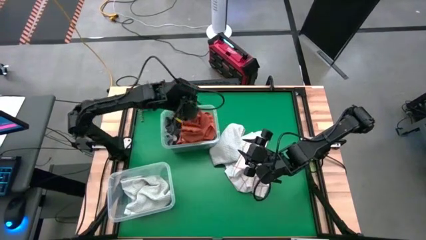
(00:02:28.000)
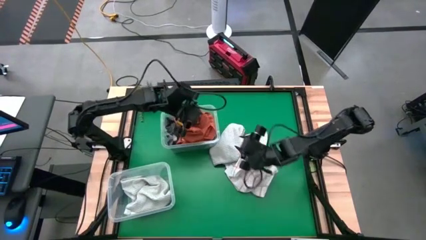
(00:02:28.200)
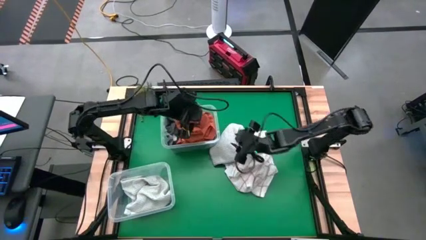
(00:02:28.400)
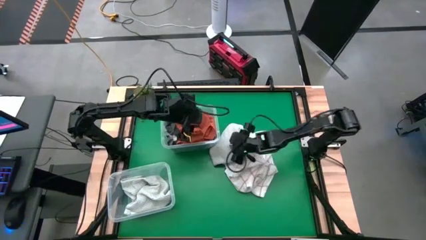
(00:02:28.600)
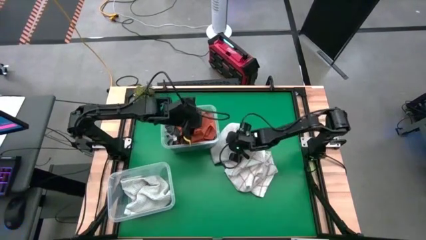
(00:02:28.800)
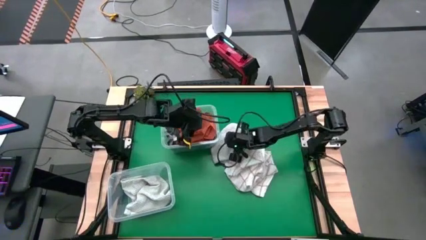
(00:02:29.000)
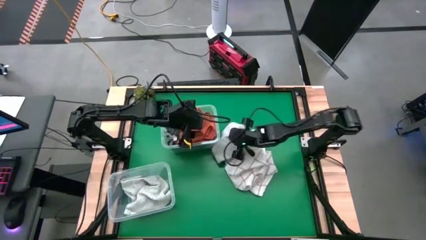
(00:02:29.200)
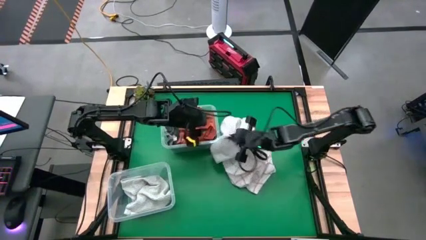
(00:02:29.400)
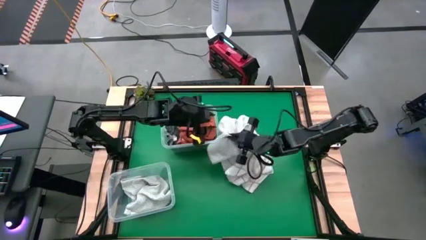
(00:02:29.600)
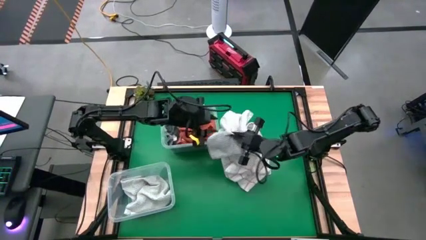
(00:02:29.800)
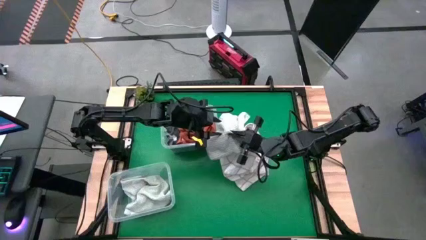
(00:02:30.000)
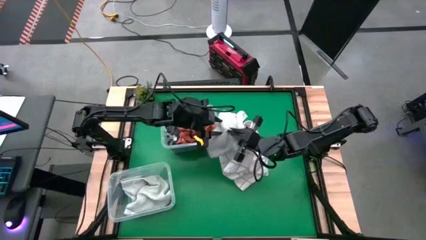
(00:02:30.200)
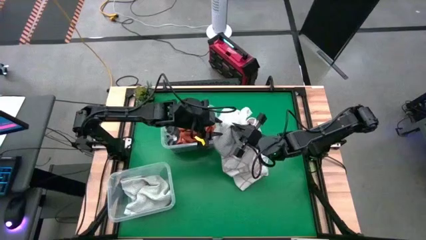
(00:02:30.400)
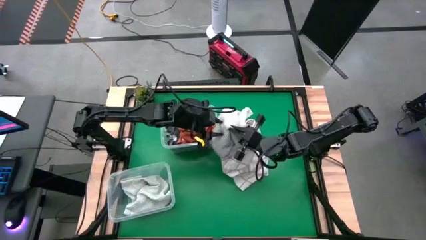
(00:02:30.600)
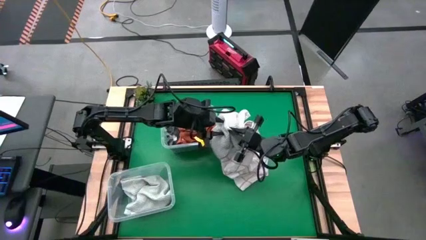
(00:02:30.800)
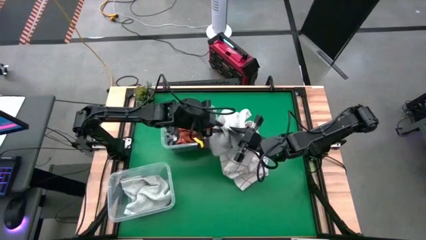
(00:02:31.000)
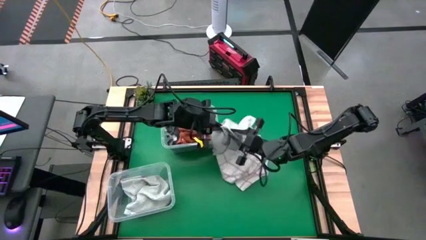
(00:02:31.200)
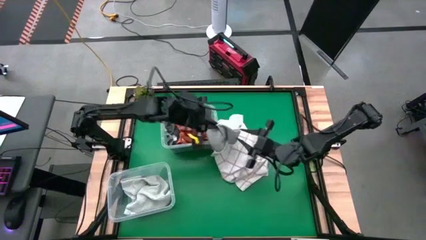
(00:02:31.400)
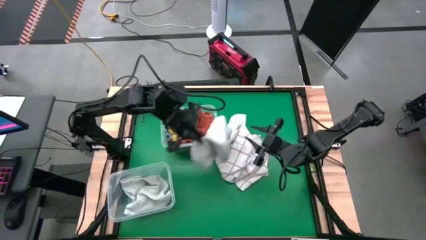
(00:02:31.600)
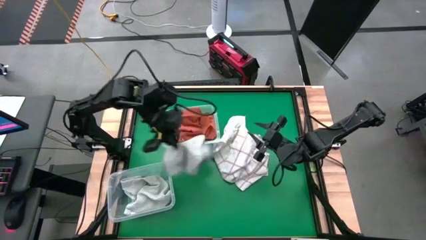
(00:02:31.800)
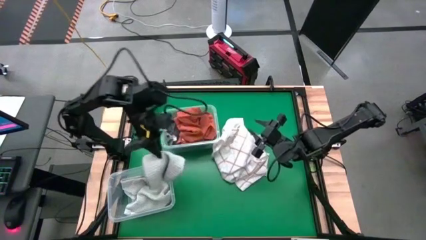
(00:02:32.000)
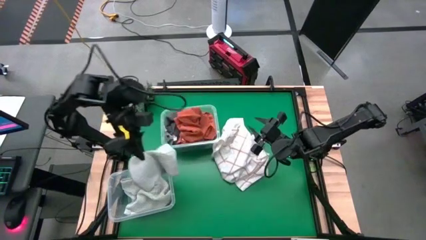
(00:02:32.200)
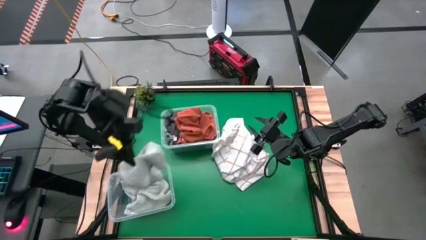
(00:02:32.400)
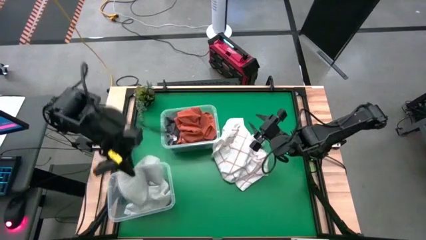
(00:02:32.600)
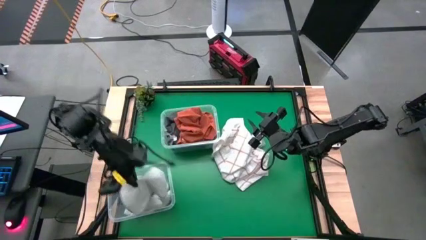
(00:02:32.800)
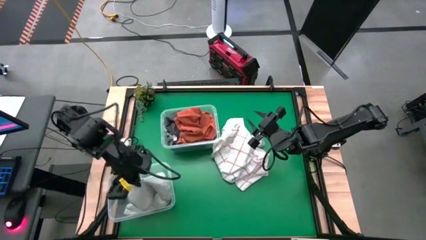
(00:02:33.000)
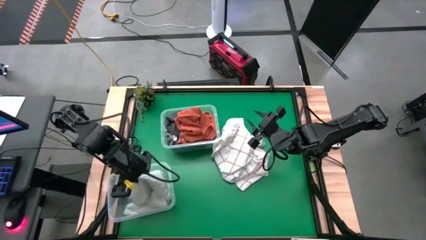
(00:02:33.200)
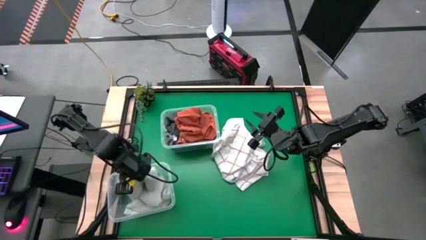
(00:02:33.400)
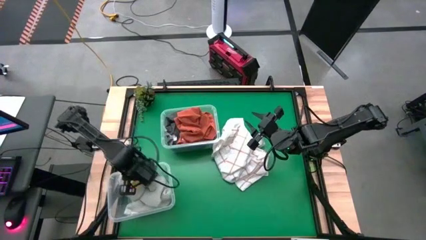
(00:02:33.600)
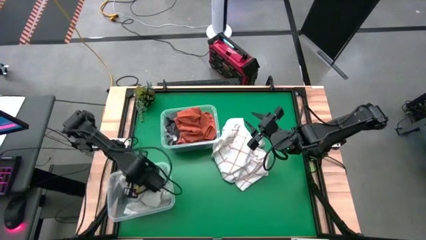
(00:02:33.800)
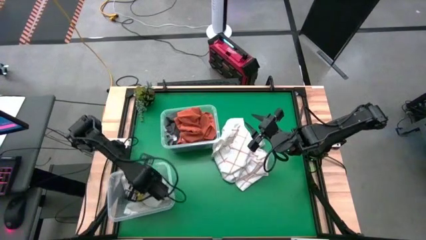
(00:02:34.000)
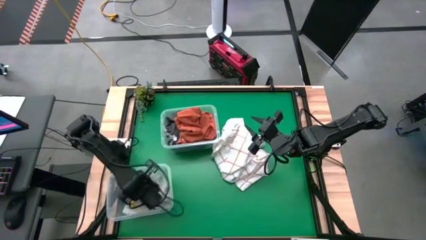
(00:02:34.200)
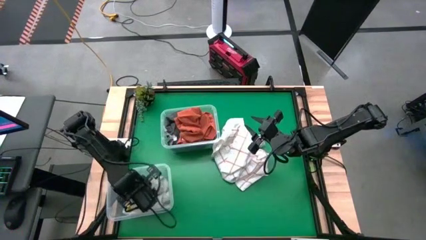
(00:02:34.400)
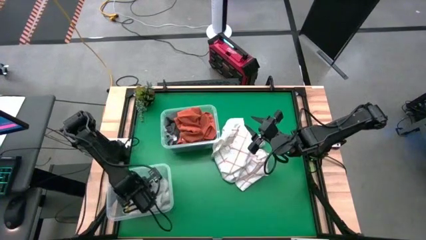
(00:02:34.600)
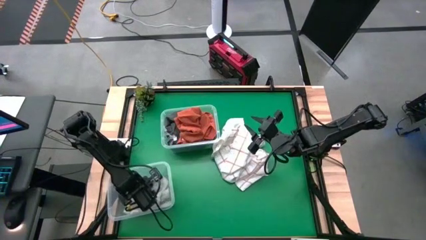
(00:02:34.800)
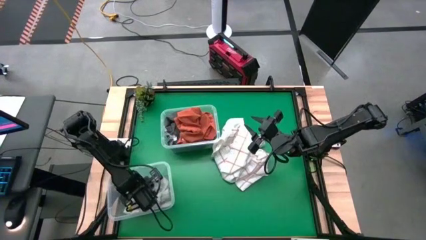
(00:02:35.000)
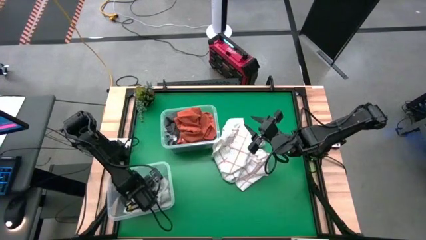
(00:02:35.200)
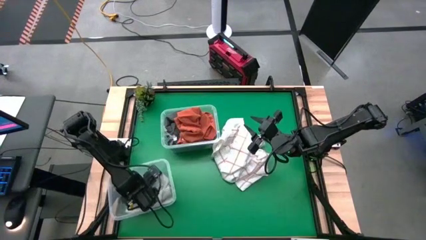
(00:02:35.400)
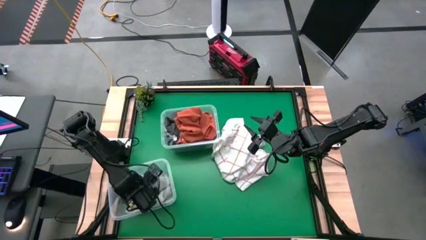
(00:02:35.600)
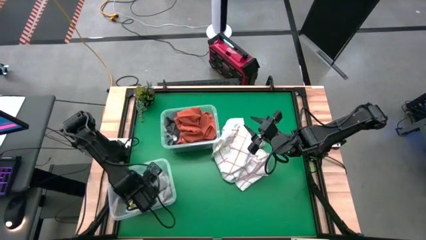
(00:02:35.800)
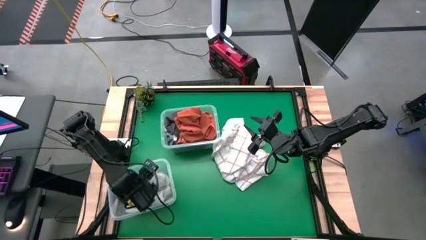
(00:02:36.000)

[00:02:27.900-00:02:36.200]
Task: Sort towels by color in basket
Put the light gray towel into the bottom transparent bin

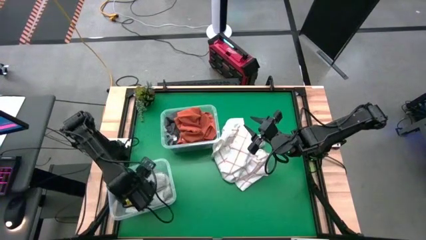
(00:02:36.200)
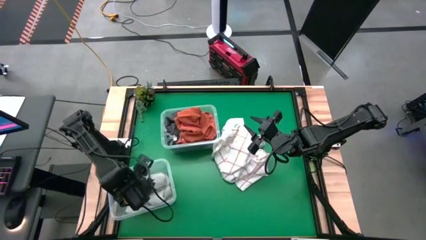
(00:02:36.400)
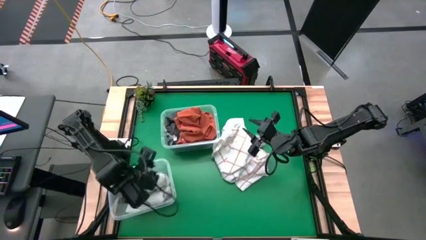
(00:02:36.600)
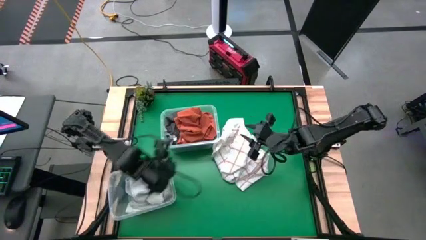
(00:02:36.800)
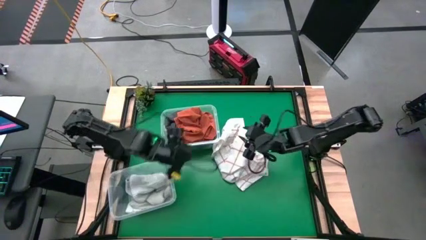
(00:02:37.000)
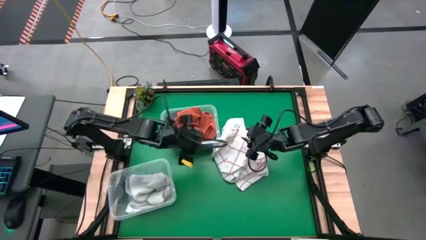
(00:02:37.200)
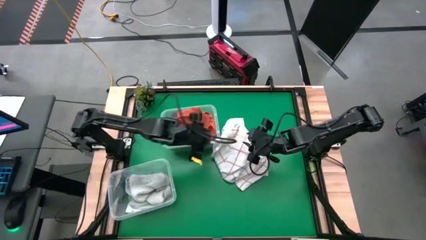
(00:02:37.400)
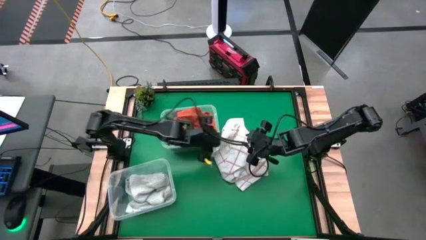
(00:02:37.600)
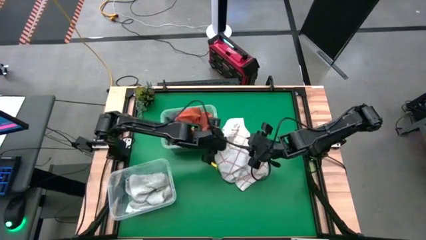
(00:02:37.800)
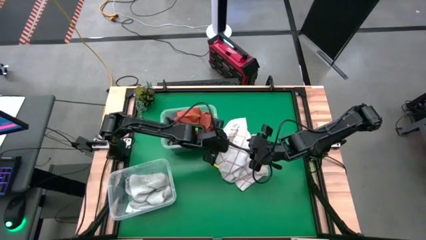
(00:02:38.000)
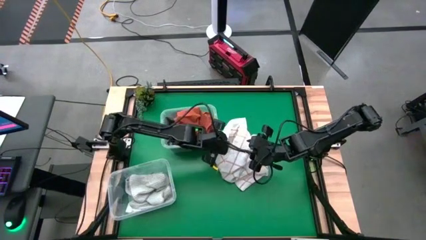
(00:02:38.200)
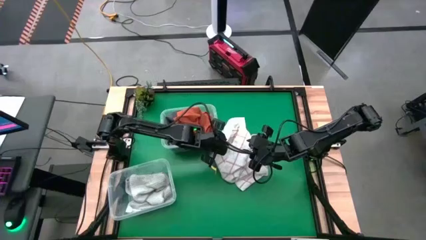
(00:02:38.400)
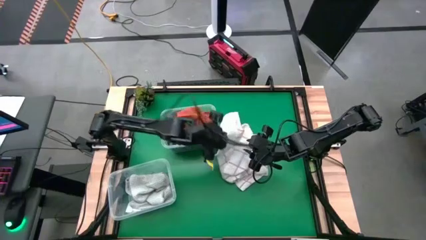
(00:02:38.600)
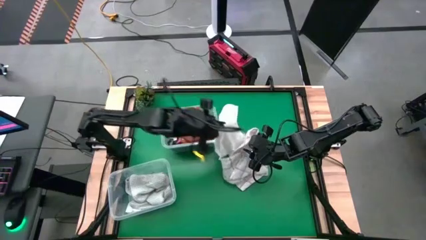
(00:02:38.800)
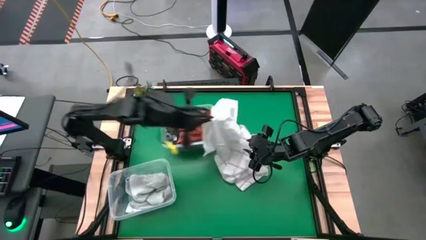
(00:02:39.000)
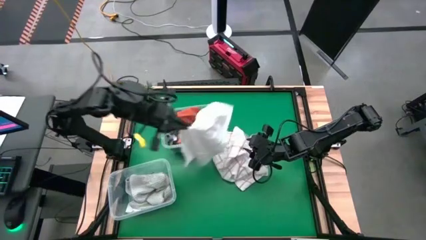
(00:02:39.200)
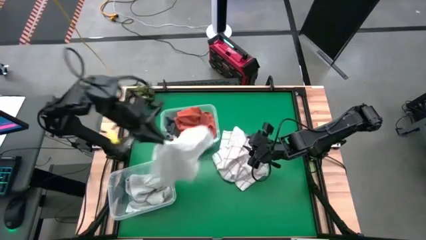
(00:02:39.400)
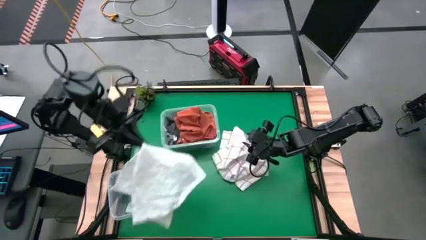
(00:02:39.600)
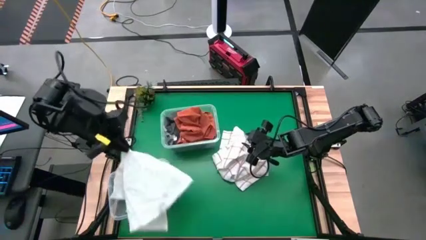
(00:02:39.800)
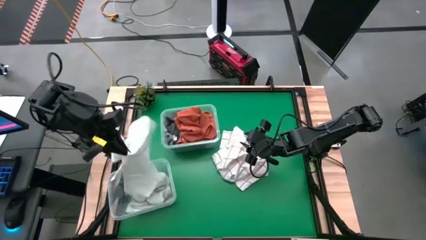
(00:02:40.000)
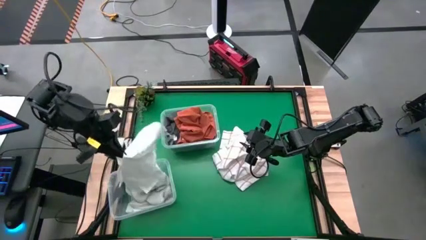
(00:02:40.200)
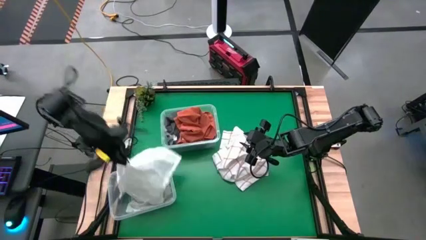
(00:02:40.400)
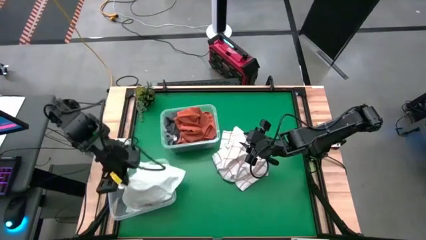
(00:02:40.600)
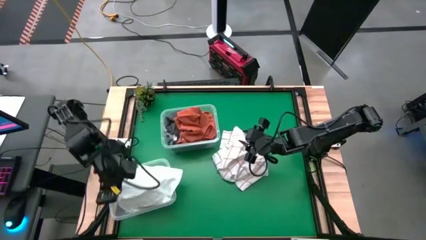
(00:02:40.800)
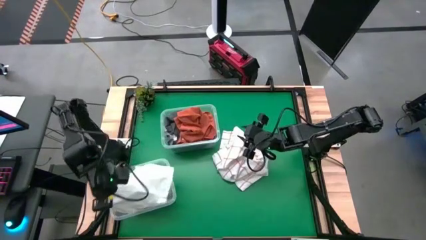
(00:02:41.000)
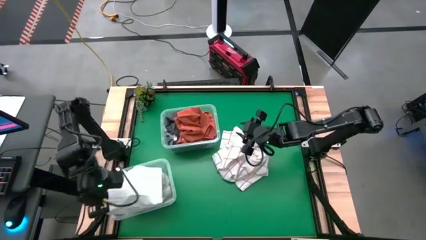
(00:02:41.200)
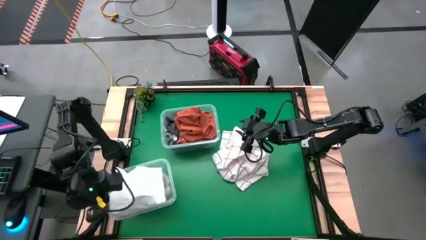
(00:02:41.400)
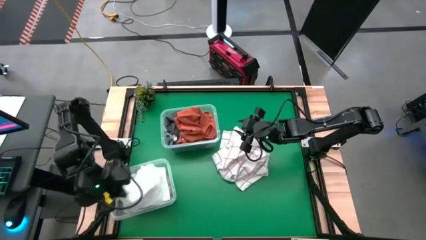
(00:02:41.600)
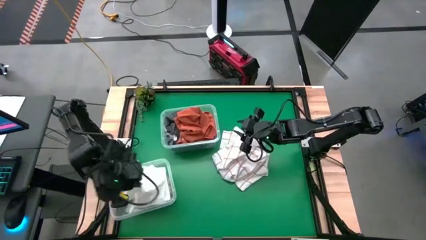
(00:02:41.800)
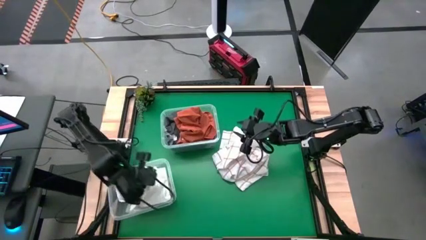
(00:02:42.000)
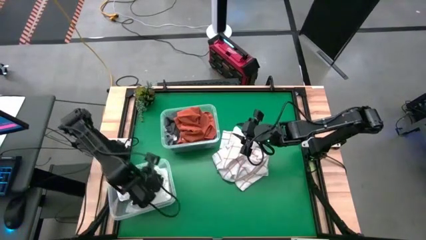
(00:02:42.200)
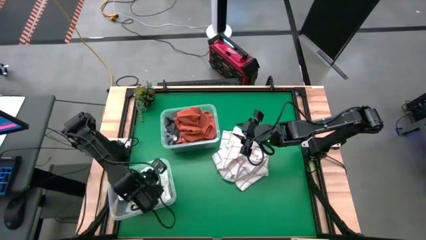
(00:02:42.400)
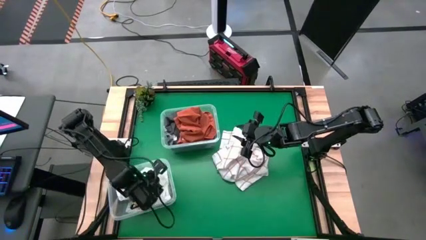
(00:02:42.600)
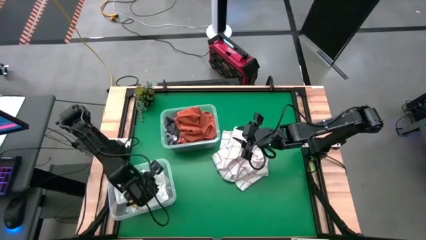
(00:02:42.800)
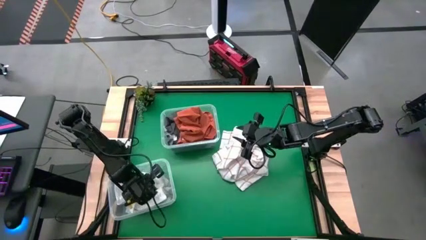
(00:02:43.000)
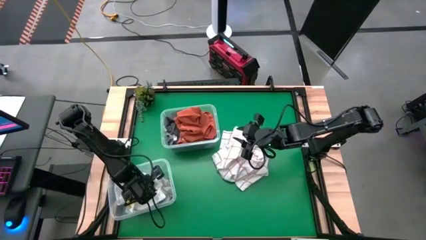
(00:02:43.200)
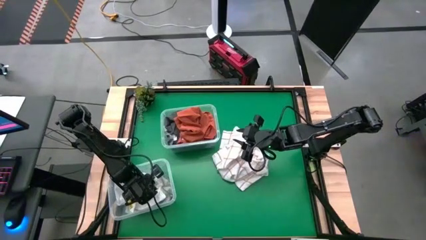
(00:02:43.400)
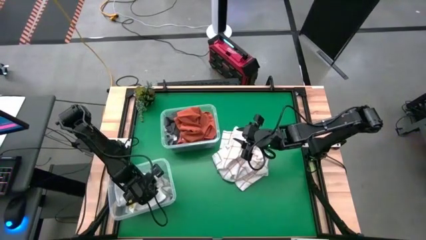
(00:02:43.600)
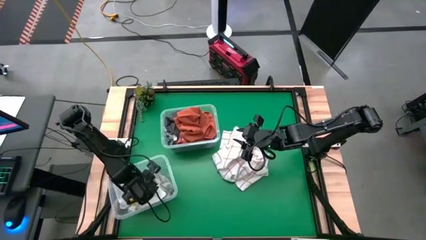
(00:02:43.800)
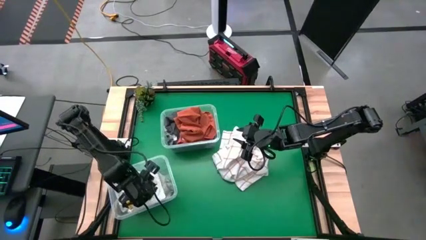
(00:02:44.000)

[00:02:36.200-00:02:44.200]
Put the white towel into the bottom transparent bin

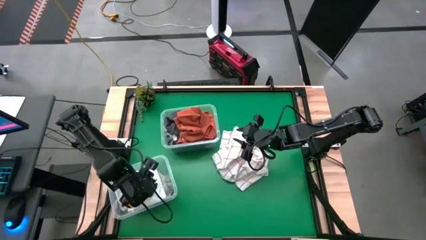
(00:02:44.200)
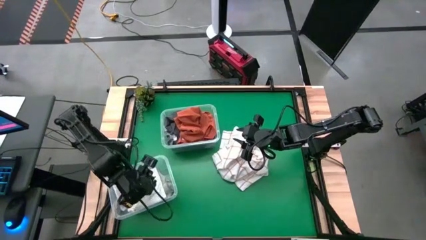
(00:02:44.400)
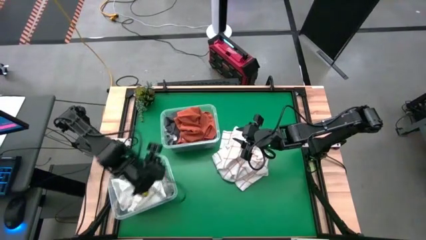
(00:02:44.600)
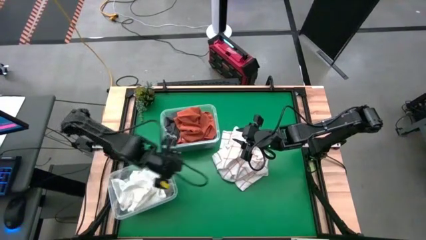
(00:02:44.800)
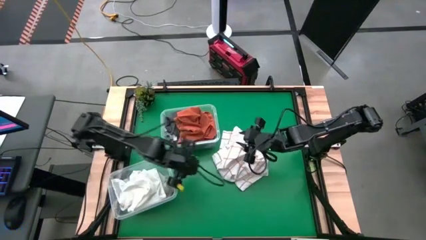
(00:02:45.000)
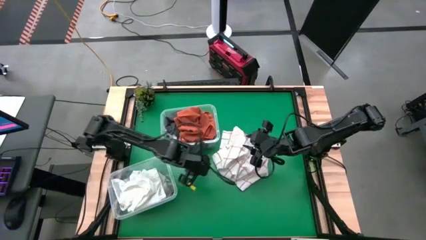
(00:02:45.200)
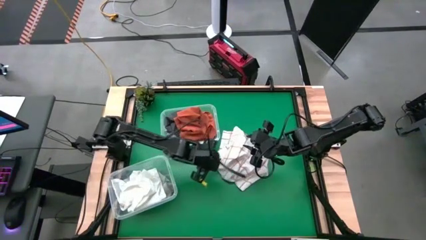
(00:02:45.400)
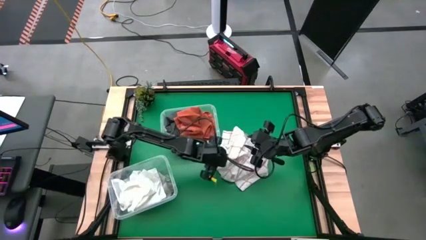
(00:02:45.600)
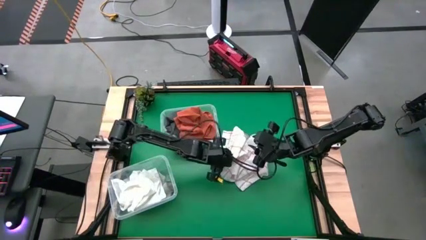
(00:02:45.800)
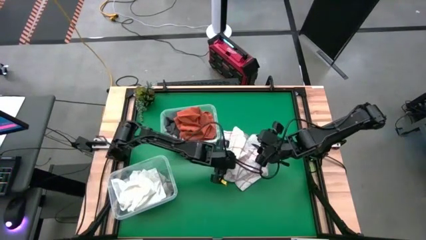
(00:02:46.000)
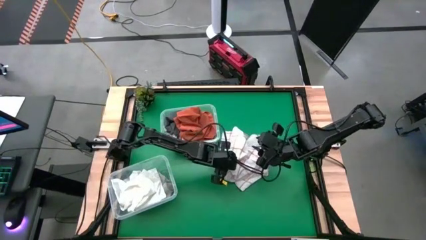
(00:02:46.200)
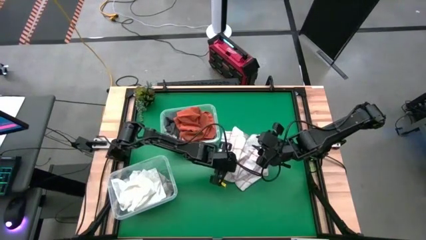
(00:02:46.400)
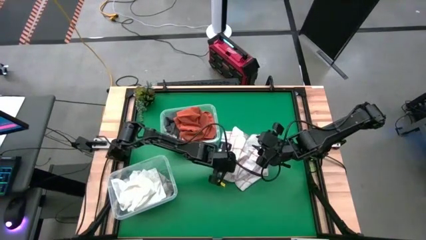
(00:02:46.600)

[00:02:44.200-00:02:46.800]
Put the white patterned towel into the bottom transparent bin
